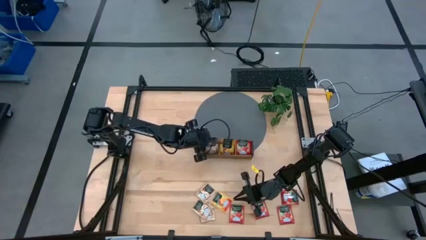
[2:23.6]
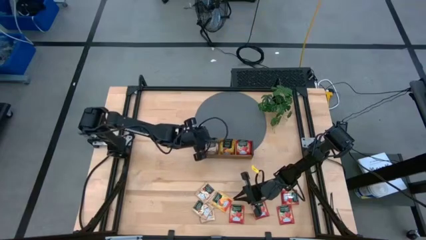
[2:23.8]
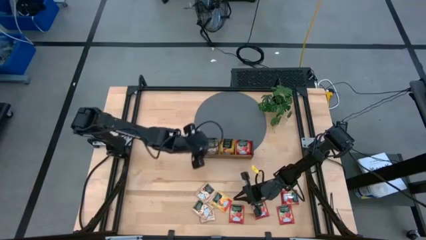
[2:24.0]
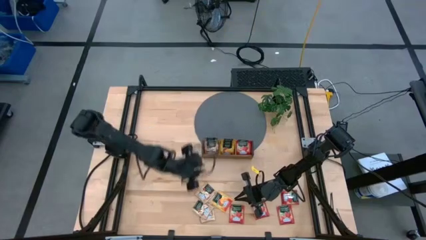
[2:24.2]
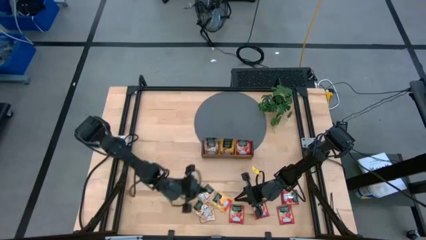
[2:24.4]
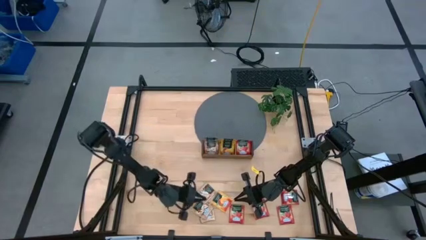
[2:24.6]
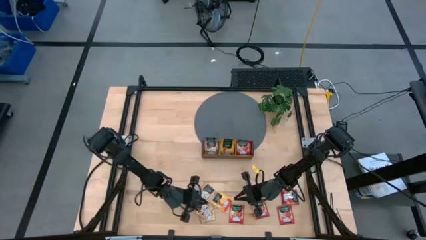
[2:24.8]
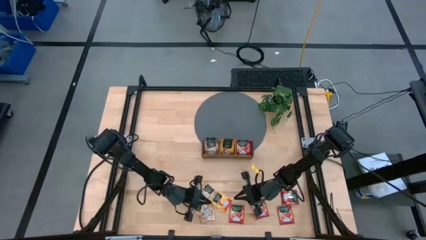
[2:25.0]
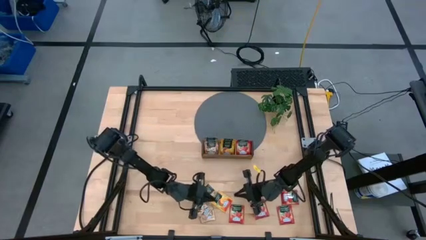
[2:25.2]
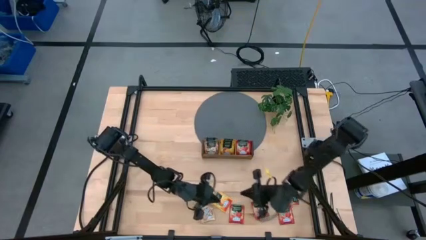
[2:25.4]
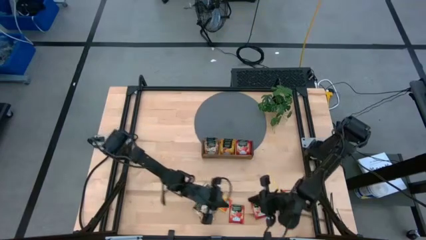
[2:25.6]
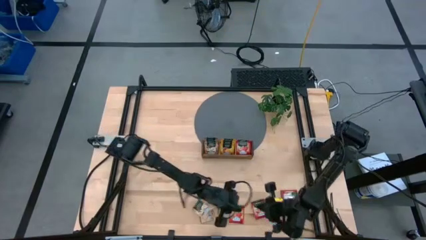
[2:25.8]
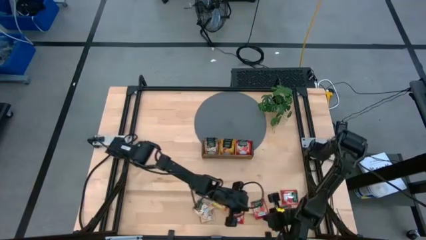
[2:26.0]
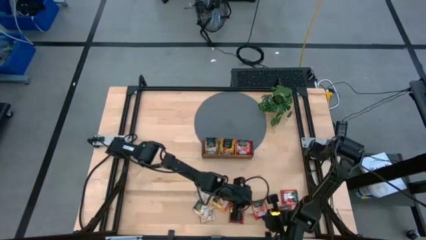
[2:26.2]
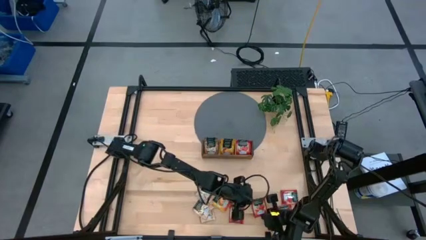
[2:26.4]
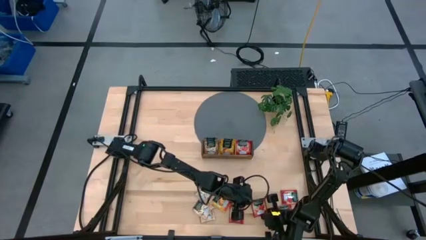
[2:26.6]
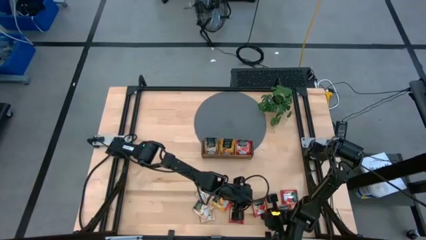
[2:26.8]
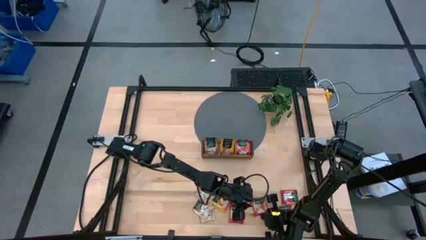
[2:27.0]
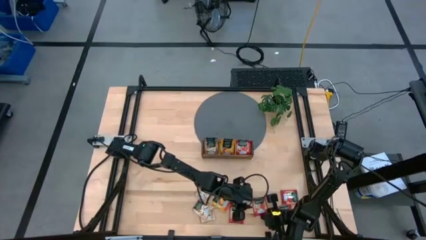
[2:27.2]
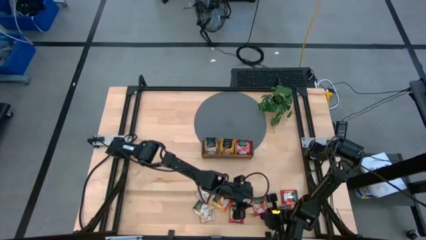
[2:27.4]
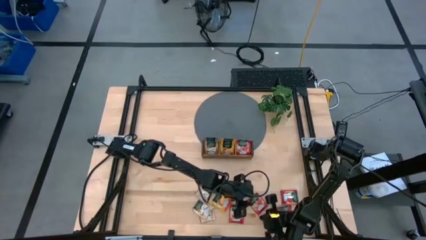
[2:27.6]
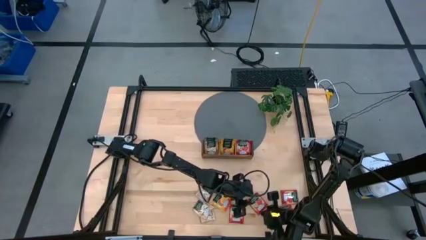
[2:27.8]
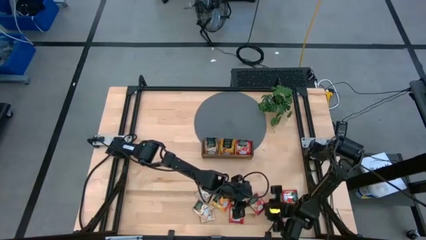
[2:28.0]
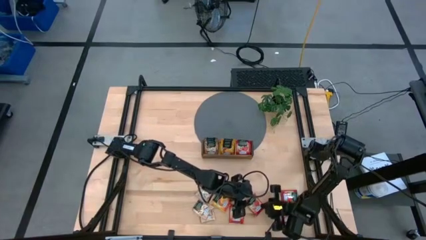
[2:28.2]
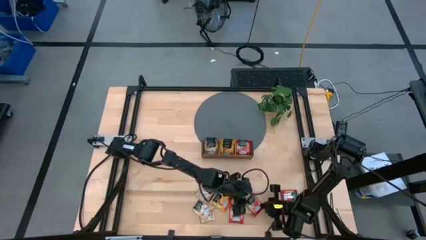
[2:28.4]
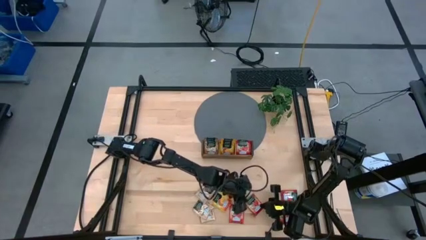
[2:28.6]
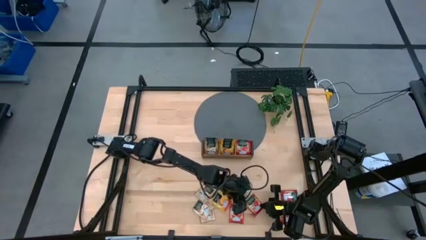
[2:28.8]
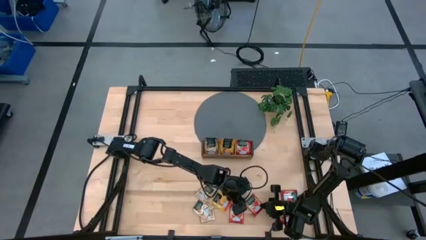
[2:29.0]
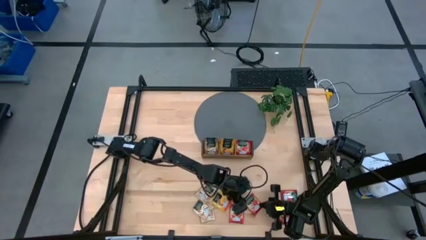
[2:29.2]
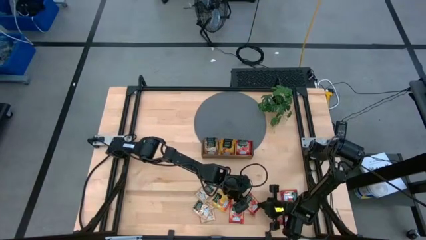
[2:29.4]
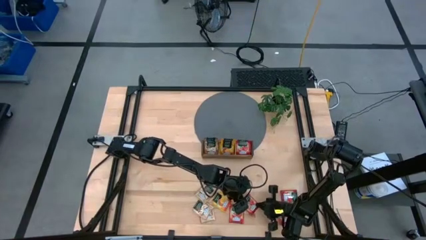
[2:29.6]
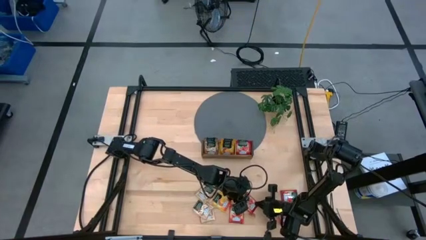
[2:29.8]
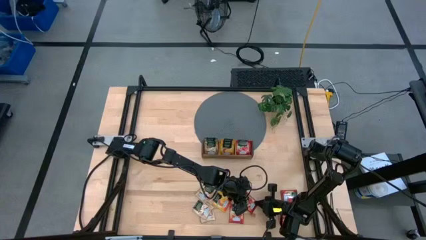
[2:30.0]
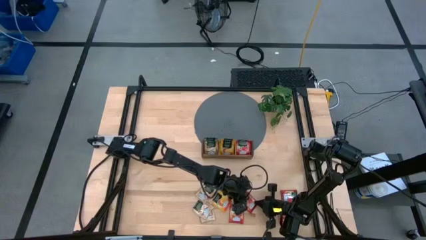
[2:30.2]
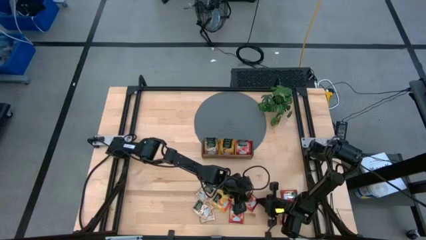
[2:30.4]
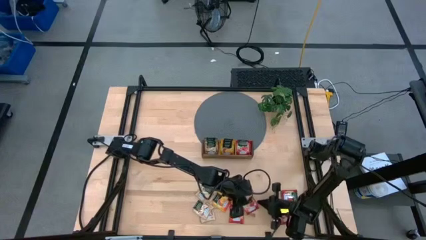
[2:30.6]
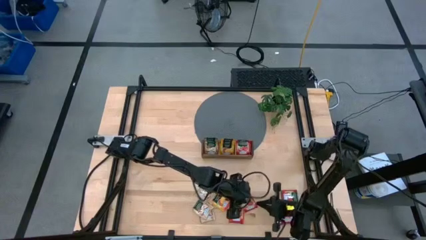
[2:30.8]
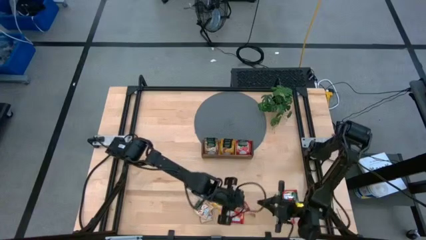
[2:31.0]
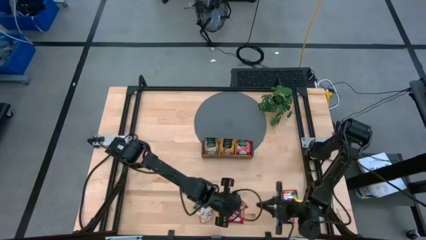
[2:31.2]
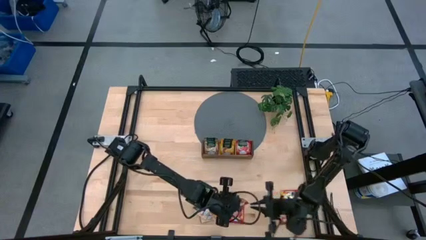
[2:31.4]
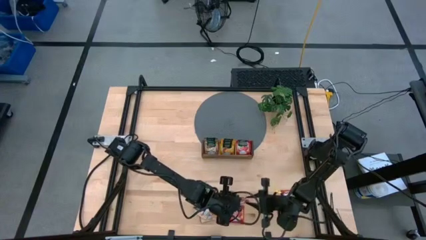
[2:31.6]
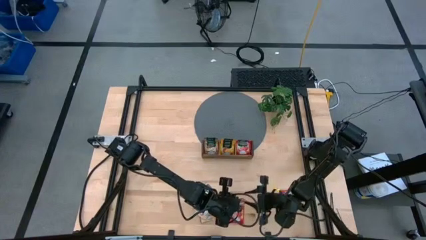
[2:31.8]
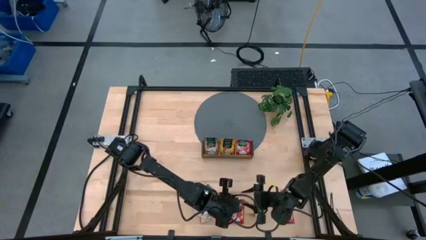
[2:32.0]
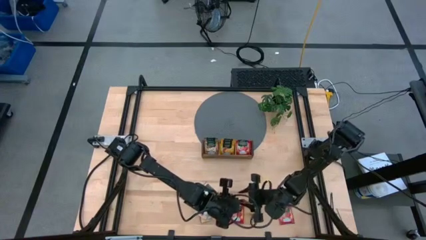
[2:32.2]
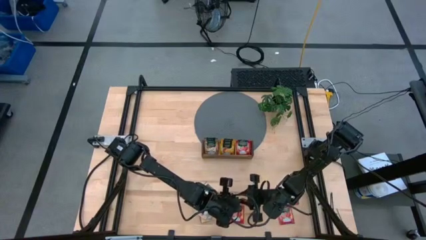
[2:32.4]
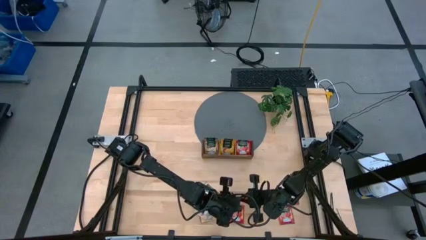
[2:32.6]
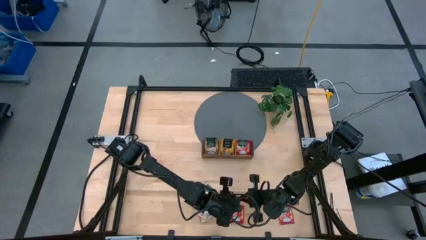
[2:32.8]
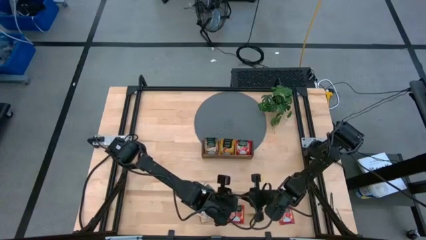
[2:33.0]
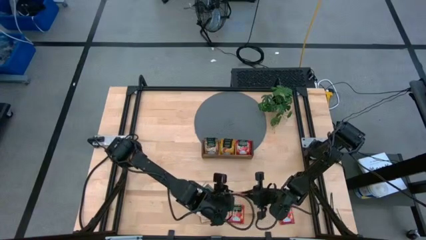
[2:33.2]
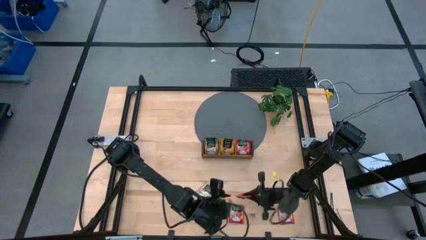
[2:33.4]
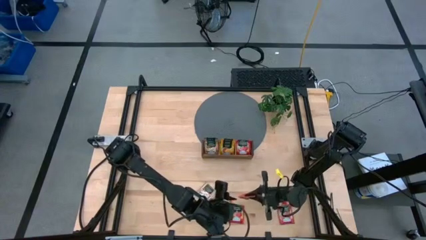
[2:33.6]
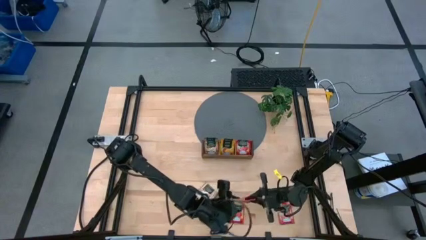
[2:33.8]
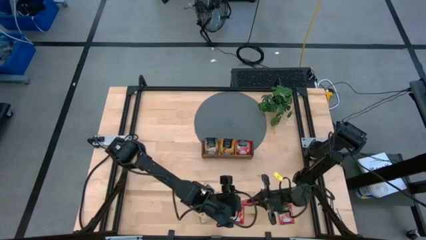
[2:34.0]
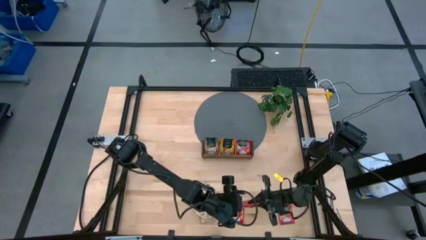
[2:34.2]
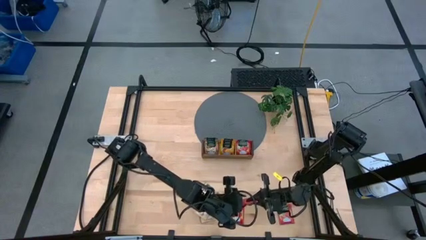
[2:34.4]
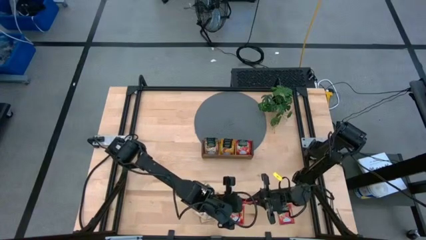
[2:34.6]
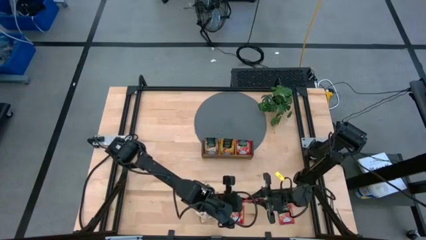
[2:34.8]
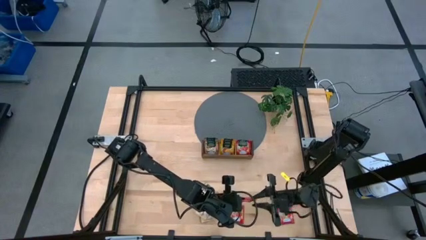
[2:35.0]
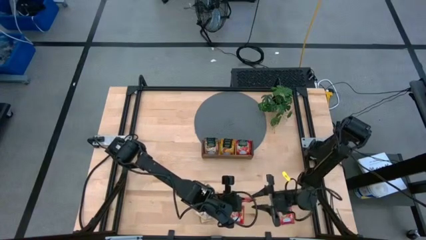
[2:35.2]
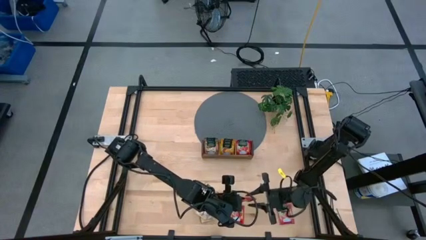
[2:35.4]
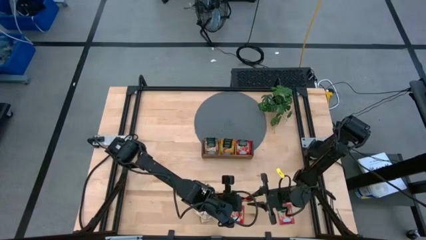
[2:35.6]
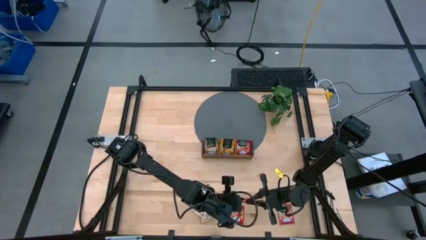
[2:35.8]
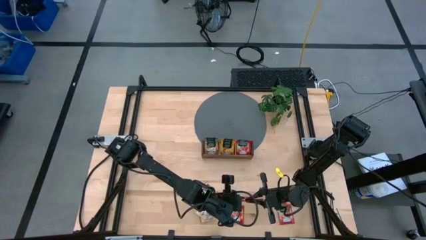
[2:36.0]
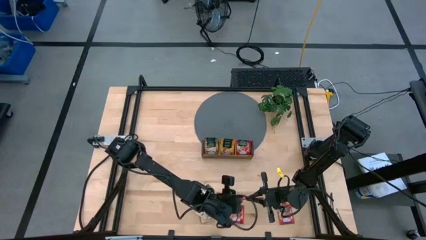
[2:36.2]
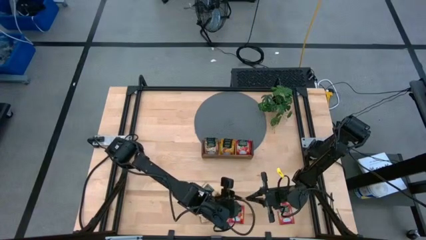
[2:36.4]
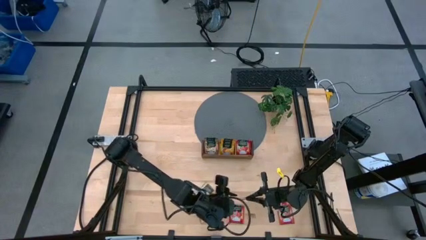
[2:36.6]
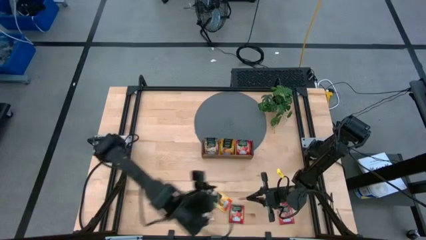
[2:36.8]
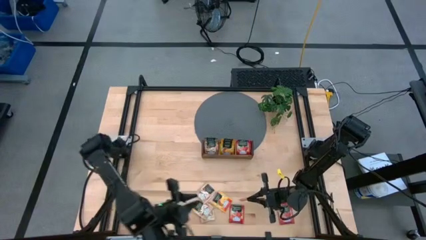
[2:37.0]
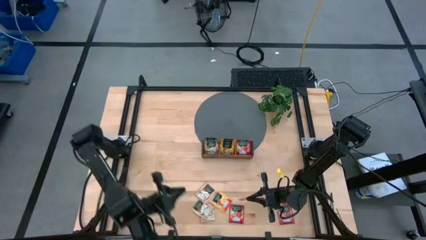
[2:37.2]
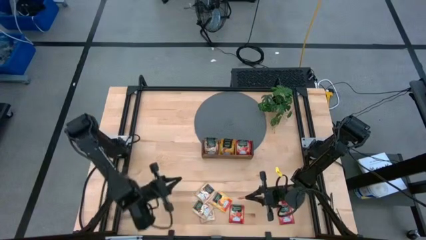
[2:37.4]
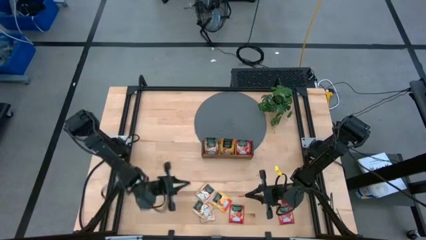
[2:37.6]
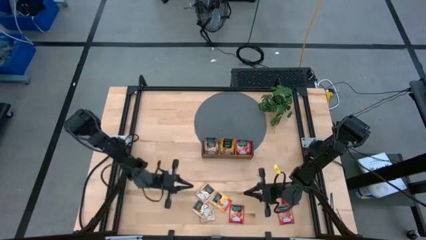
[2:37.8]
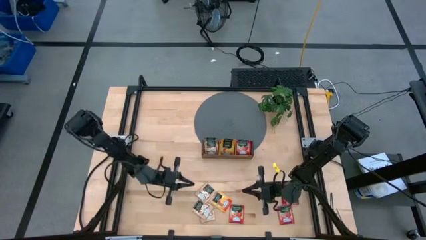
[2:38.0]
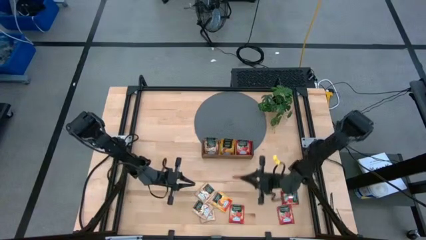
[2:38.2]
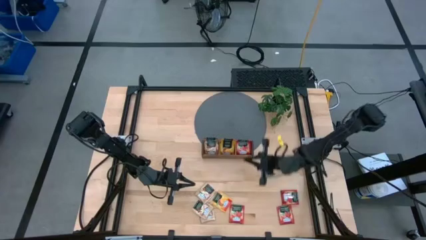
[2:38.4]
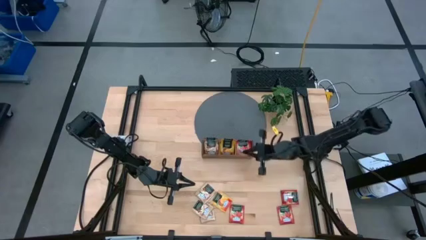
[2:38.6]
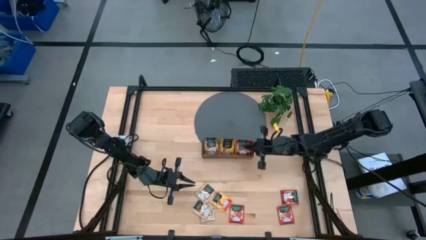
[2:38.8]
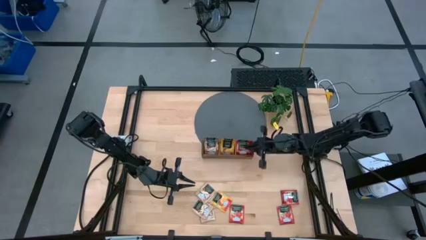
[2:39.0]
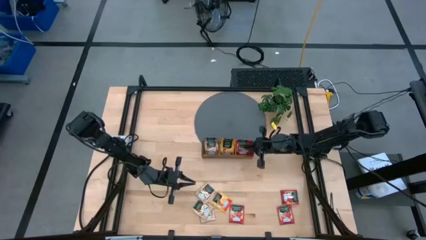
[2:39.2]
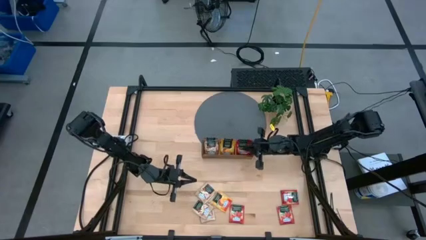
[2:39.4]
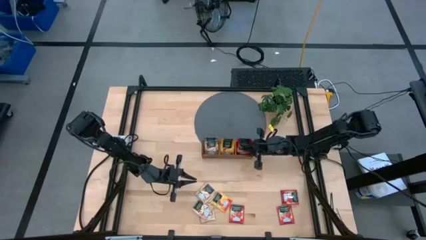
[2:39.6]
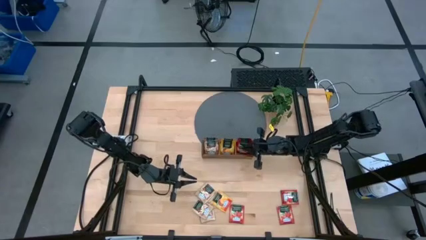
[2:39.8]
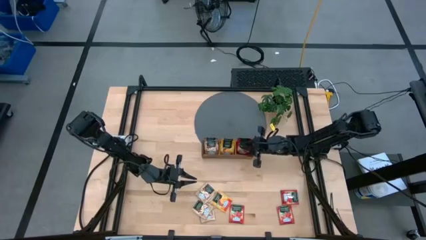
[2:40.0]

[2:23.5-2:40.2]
Task: Pick & Place Tea
Put the red tea bag into the right wooden organizer
